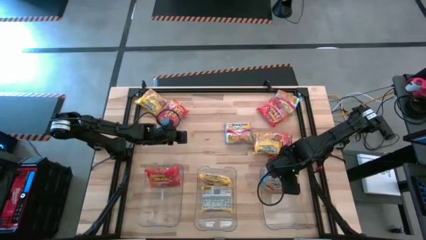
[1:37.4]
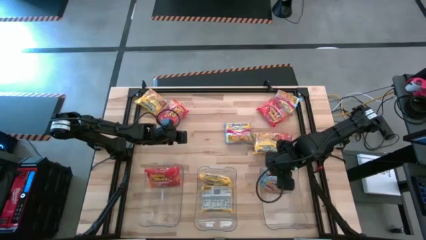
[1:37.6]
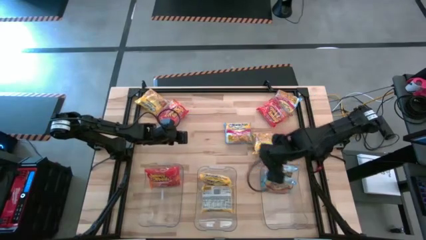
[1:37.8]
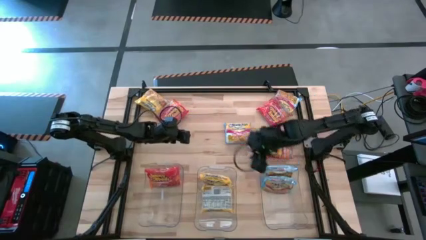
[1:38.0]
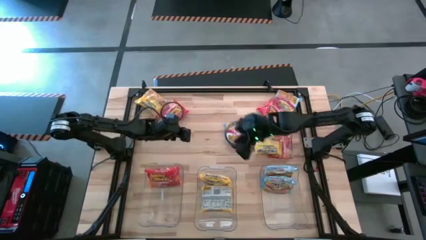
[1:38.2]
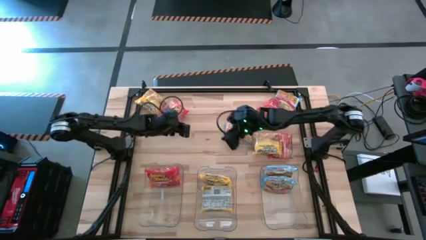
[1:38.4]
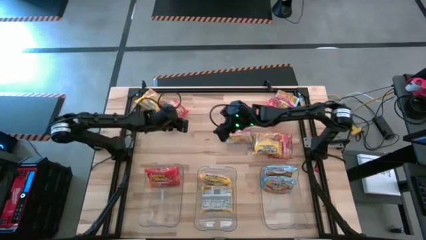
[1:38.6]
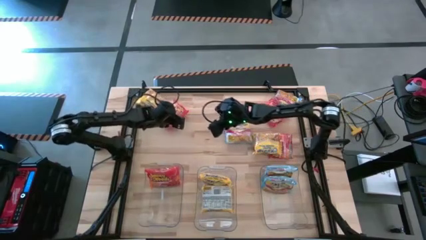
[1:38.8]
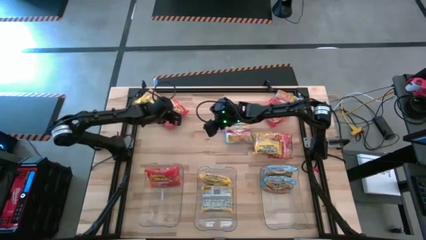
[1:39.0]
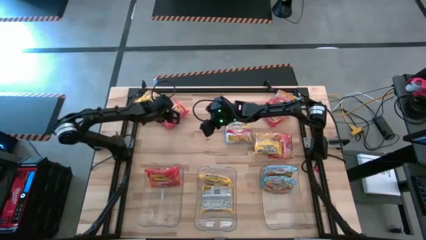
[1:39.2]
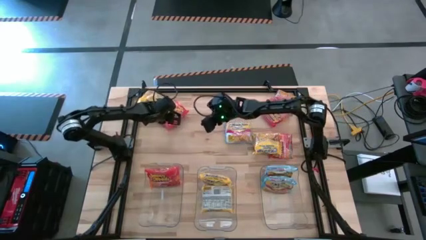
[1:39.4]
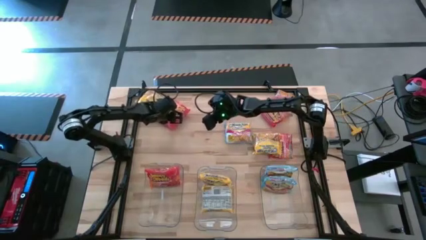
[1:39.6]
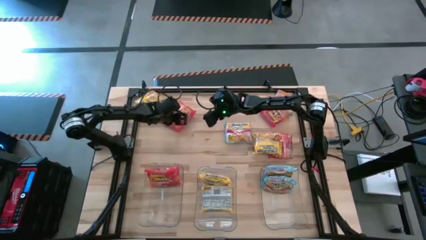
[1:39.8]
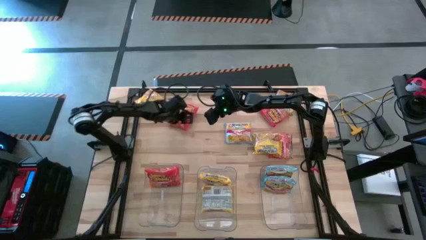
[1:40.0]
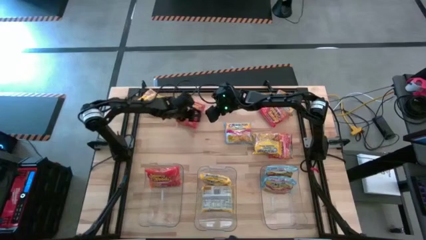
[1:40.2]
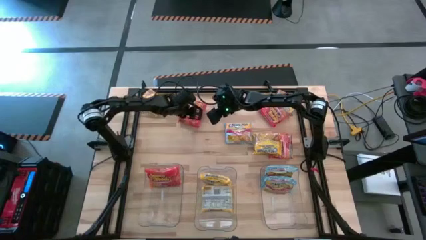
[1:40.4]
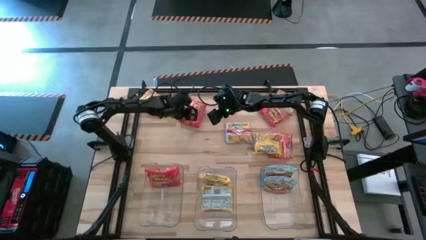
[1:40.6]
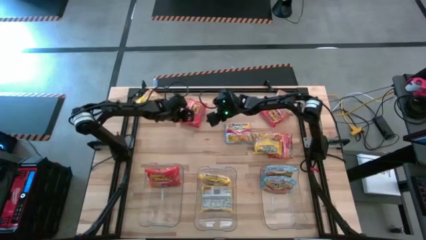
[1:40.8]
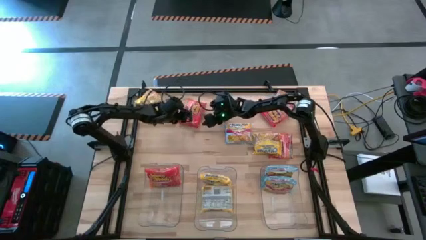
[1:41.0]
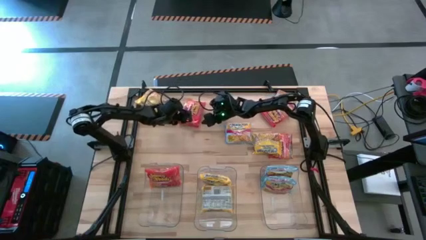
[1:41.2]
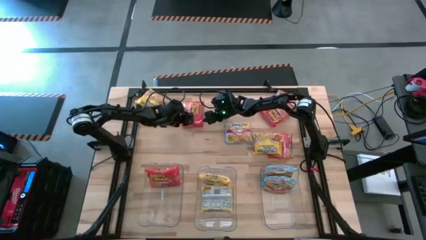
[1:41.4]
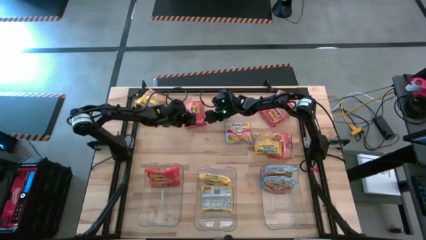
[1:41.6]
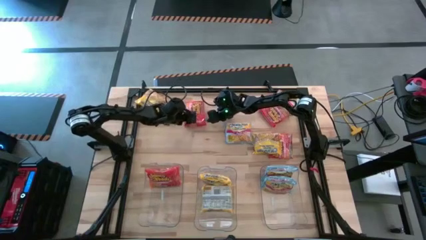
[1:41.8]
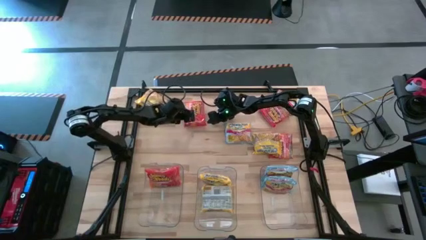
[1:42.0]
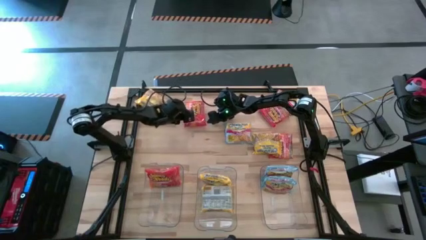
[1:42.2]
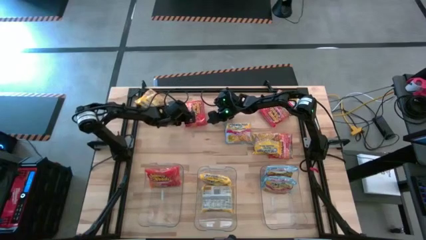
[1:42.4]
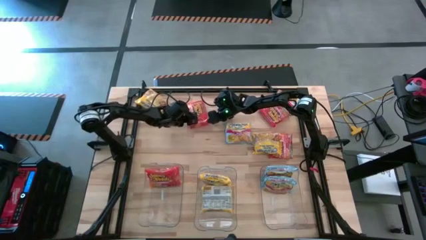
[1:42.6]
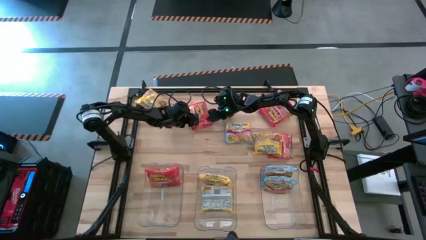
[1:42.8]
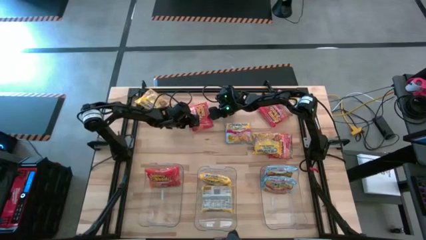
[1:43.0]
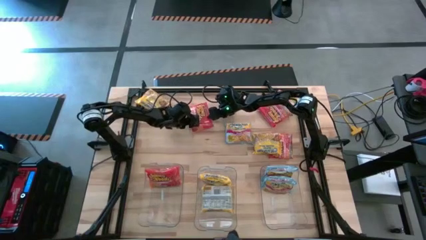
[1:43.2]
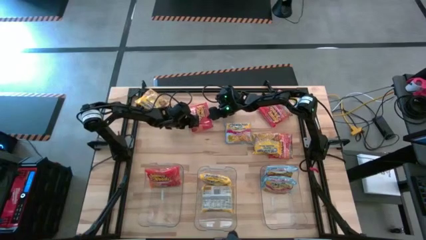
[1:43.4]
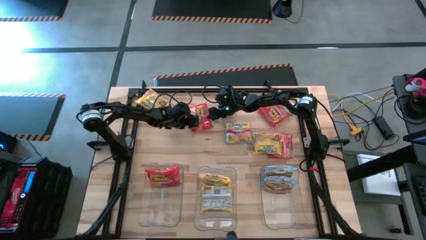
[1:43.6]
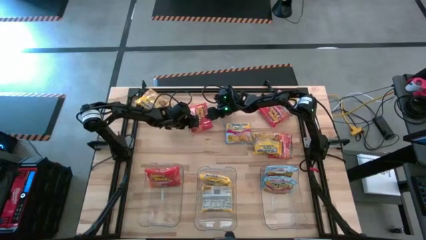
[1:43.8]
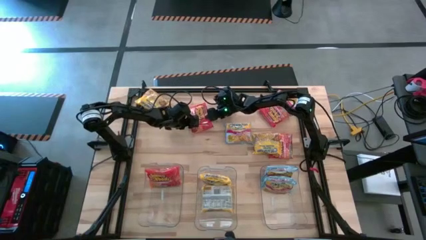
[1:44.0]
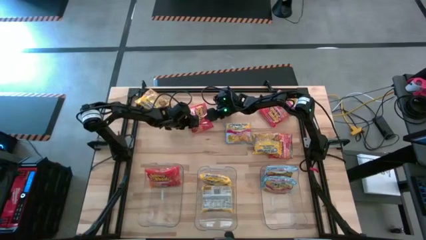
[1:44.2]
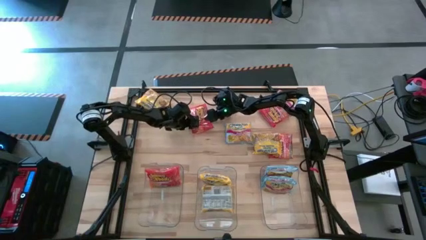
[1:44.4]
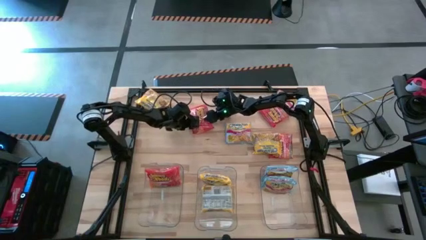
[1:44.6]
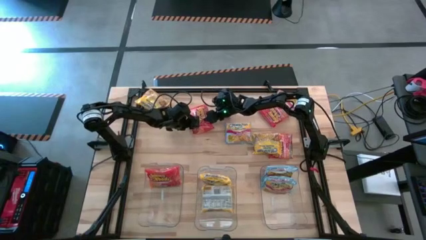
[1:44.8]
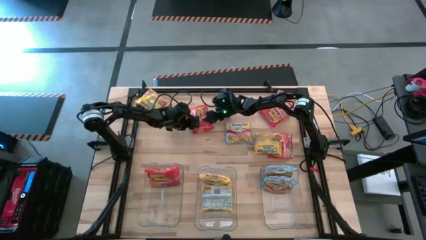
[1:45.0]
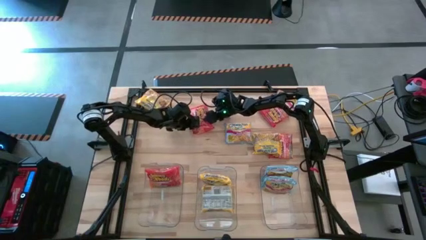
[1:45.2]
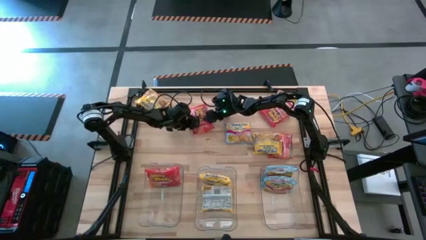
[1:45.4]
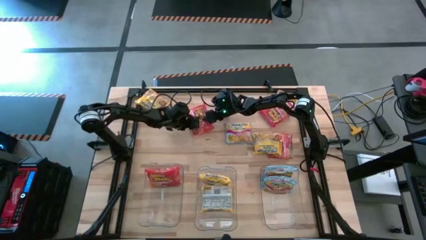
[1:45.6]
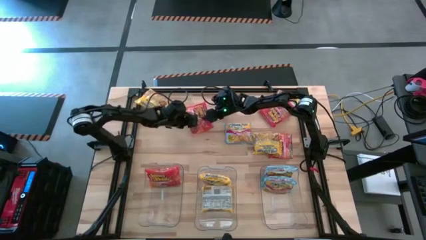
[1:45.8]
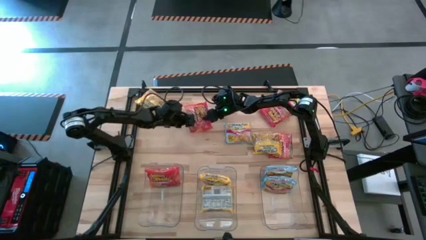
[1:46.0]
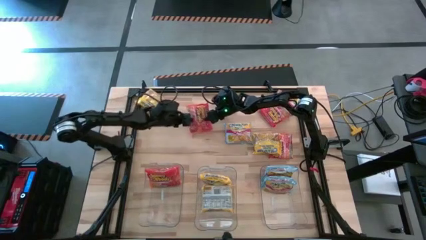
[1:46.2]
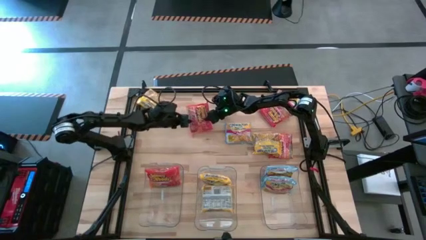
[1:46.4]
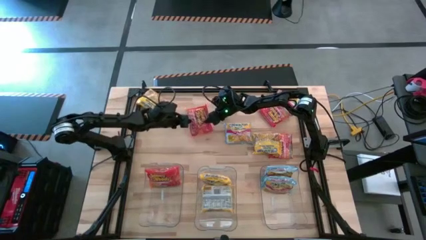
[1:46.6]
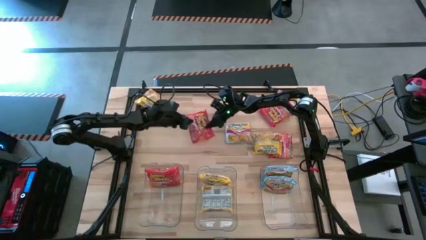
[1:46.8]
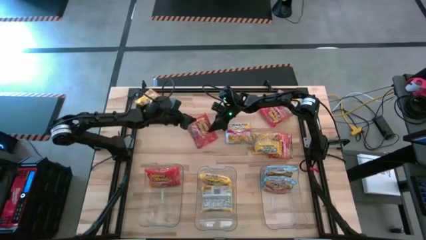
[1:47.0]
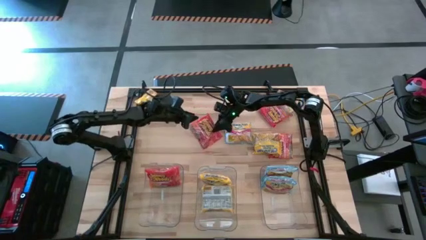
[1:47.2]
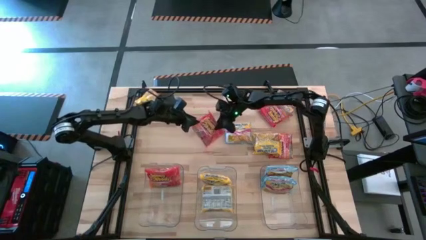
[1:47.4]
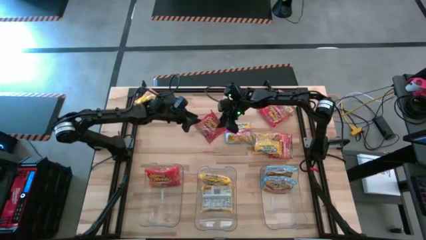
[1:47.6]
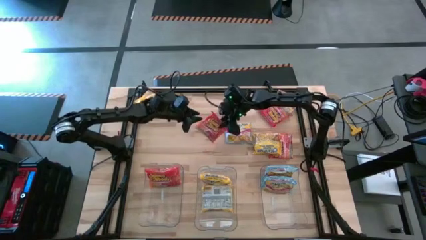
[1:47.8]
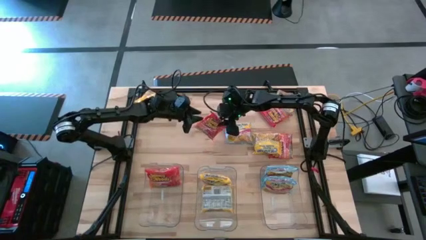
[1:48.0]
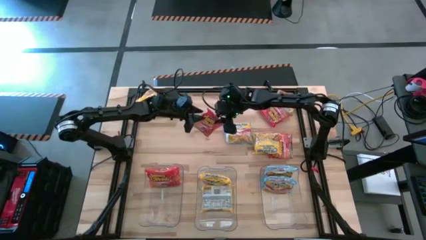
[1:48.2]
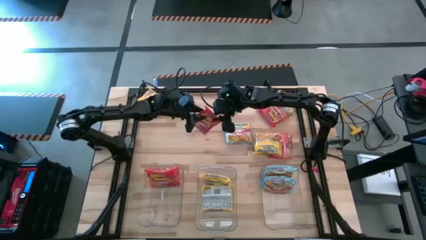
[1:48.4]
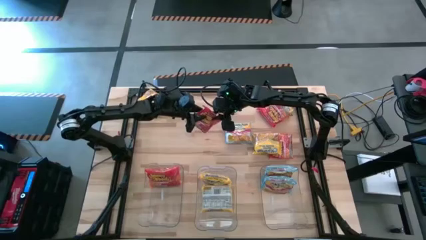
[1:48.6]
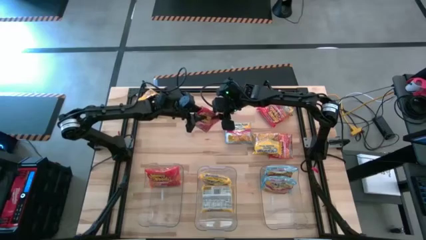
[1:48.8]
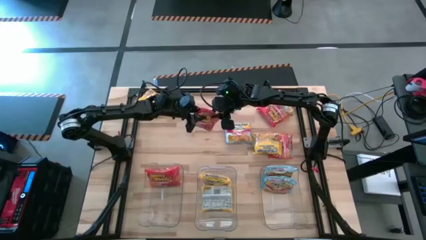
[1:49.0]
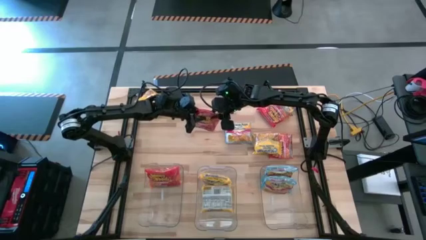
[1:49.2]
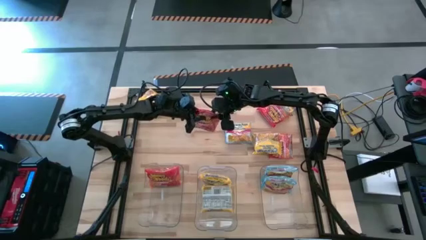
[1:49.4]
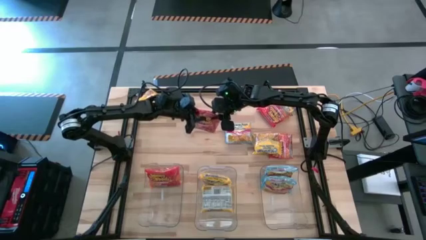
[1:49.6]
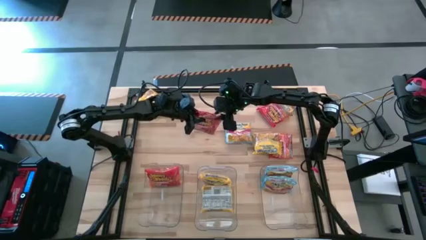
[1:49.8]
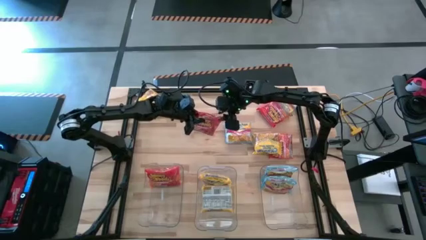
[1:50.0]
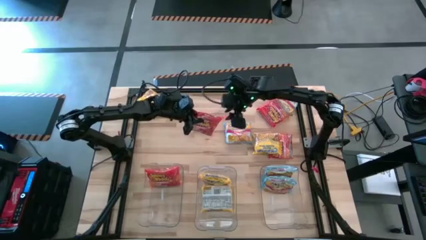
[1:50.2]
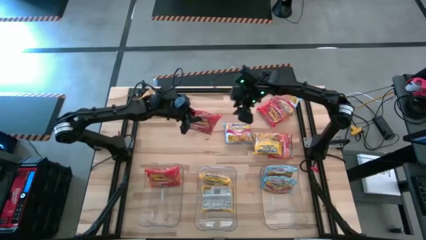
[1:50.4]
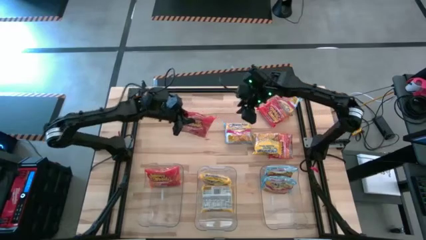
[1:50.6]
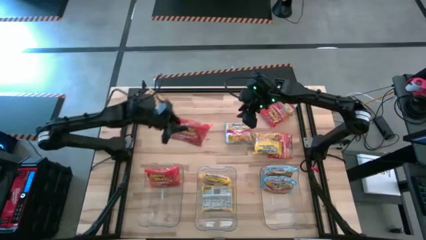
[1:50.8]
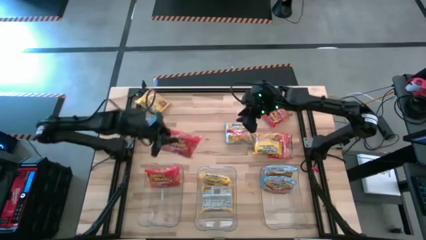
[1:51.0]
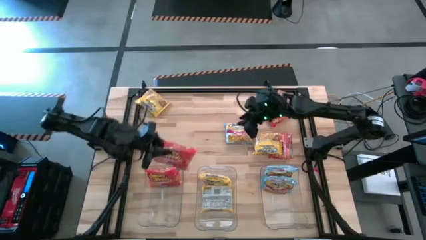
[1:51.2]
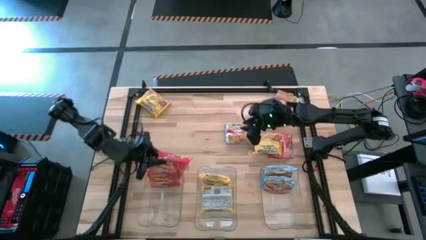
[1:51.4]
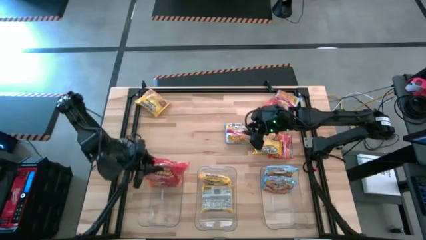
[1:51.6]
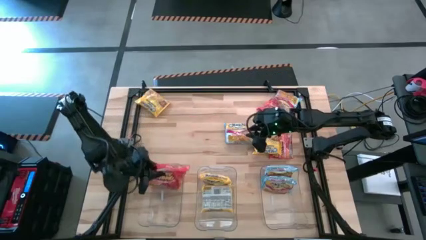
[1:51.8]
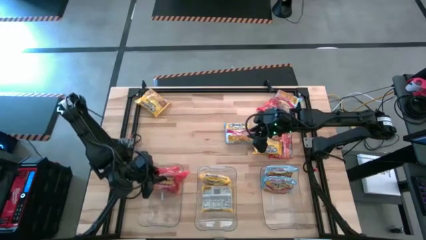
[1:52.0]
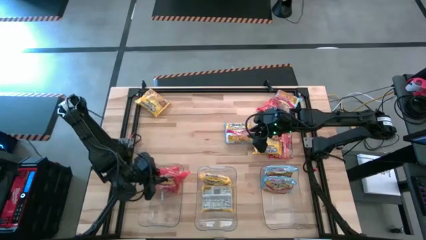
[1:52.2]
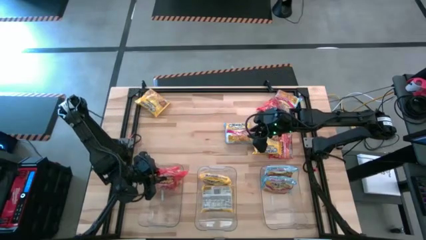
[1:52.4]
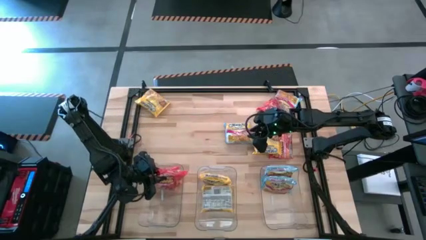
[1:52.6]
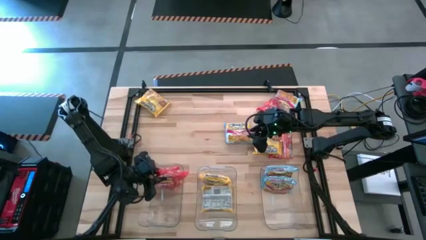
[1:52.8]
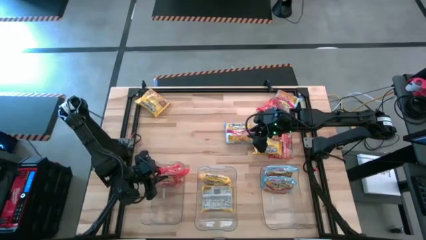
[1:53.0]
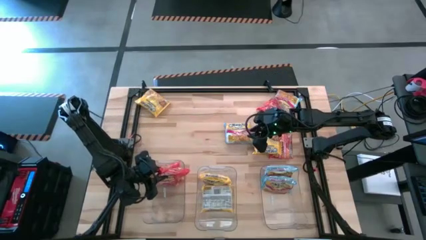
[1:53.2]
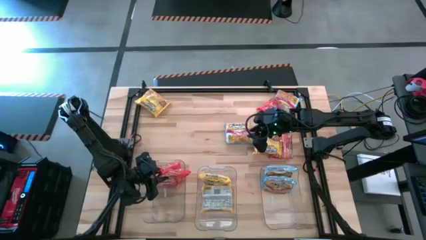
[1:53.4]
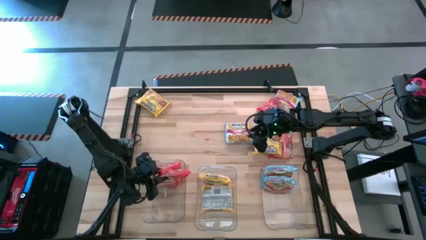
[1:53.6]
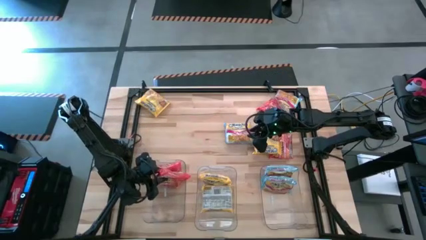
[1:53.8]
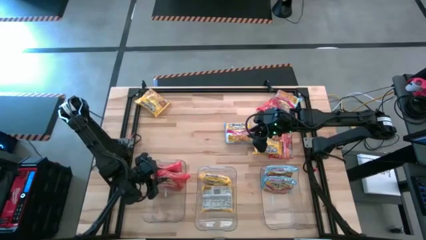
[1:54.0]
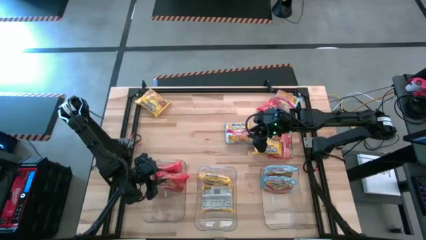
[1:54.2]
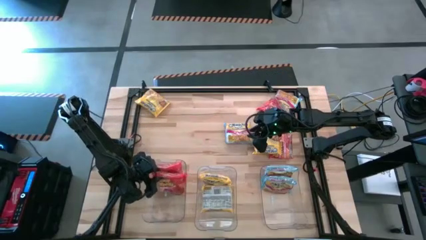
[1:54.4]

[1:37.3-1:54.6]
Task: Sort Maruchan noodles
Put the orange noodle pack into the left transparent bin
